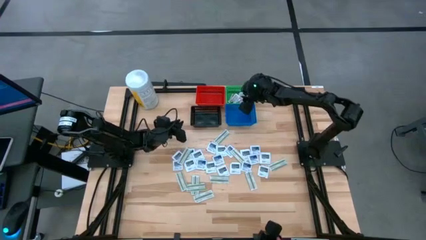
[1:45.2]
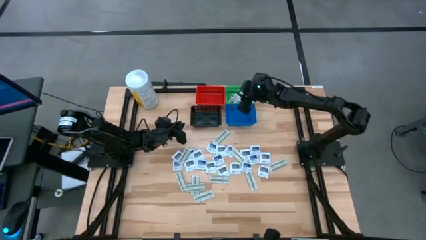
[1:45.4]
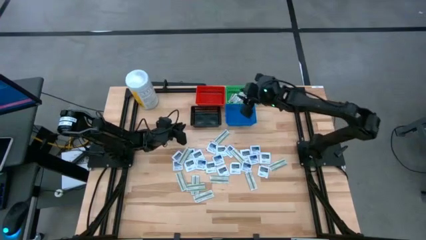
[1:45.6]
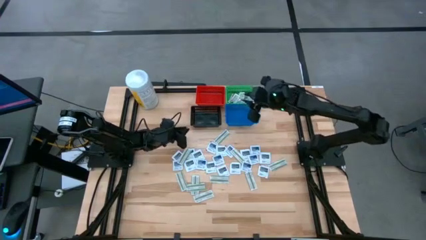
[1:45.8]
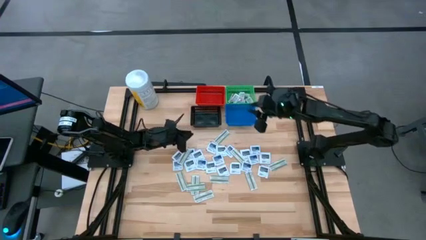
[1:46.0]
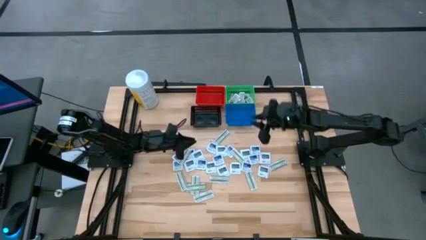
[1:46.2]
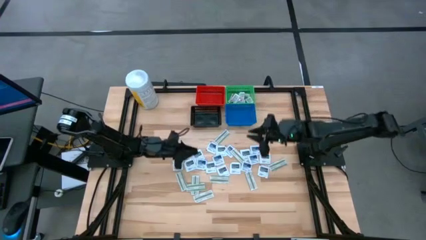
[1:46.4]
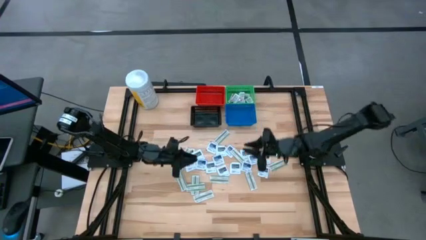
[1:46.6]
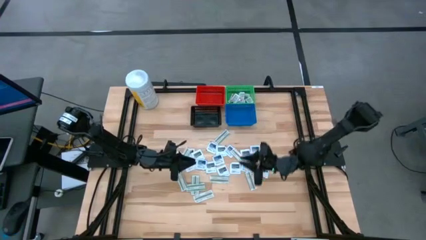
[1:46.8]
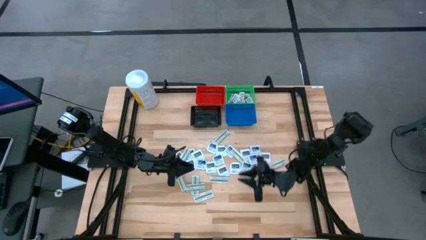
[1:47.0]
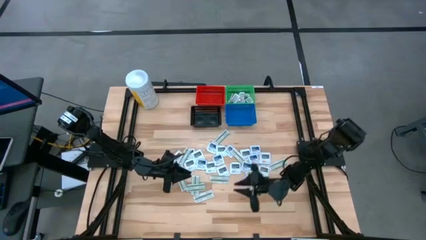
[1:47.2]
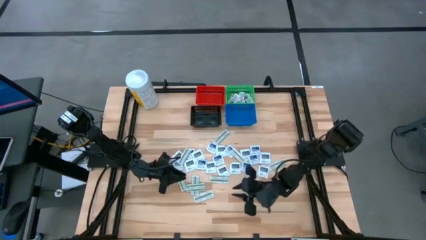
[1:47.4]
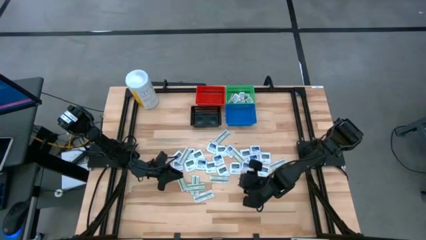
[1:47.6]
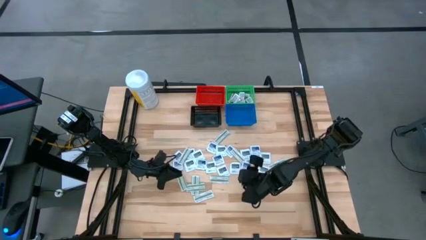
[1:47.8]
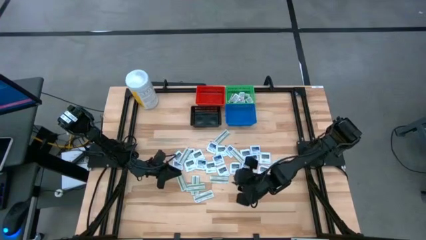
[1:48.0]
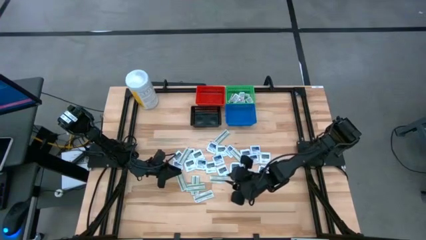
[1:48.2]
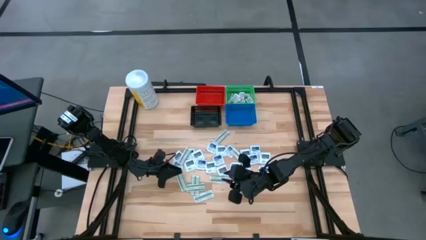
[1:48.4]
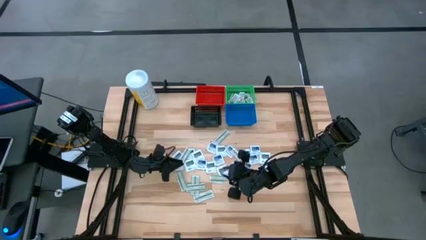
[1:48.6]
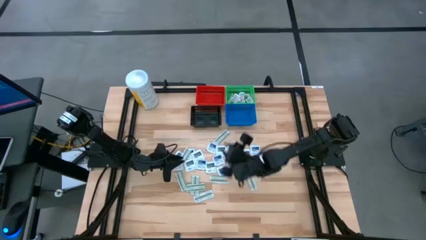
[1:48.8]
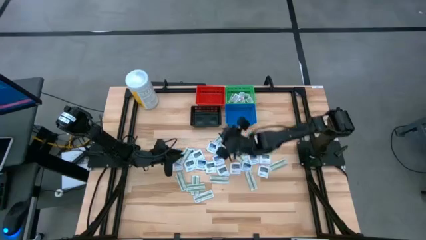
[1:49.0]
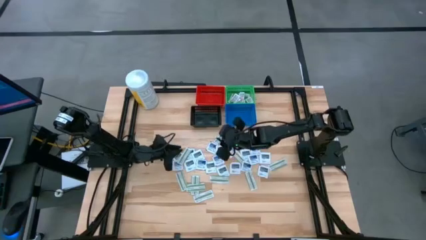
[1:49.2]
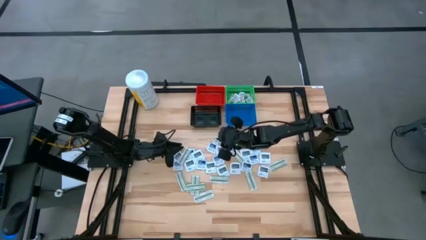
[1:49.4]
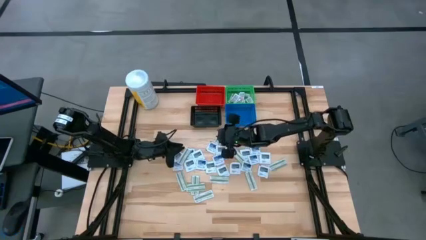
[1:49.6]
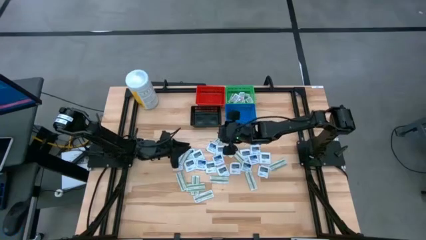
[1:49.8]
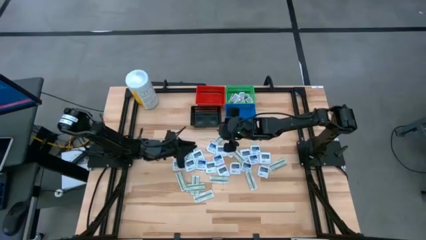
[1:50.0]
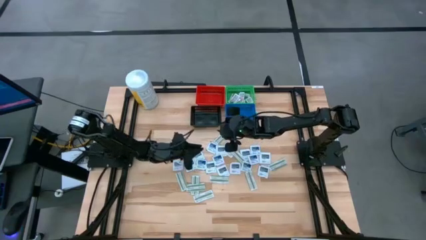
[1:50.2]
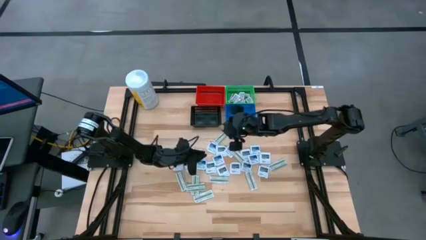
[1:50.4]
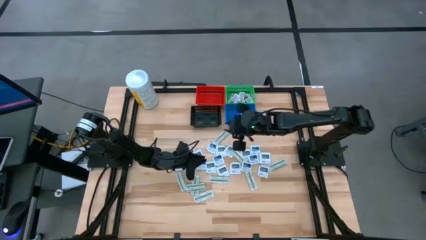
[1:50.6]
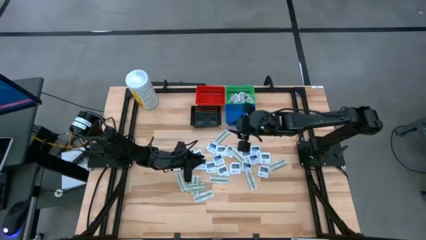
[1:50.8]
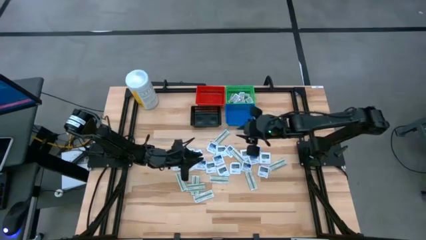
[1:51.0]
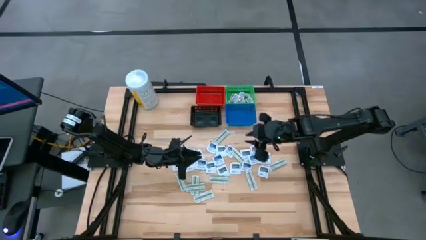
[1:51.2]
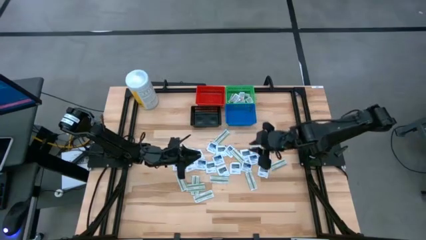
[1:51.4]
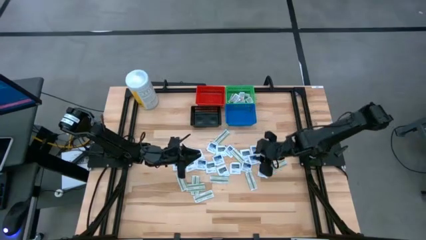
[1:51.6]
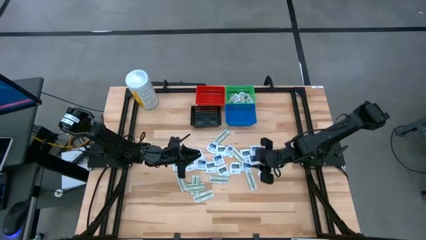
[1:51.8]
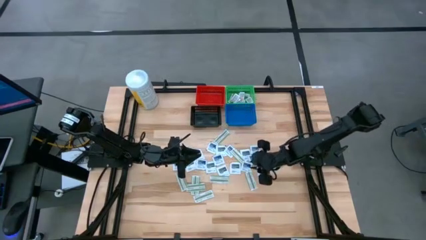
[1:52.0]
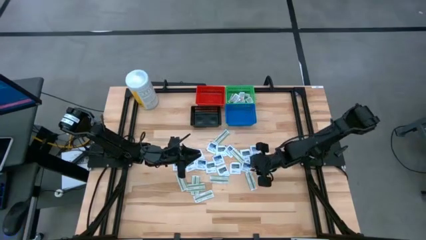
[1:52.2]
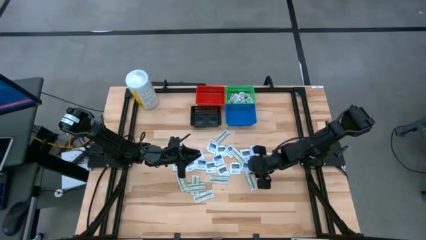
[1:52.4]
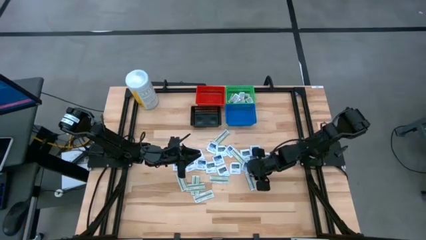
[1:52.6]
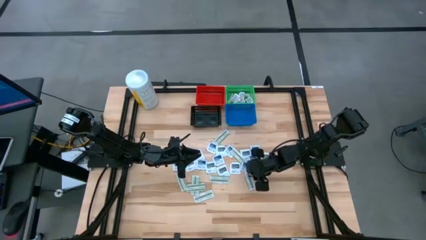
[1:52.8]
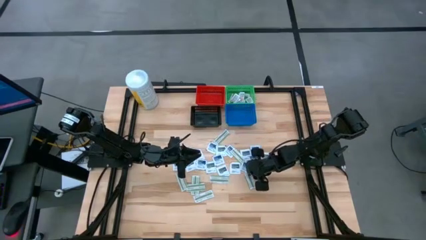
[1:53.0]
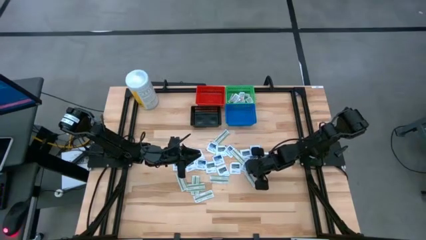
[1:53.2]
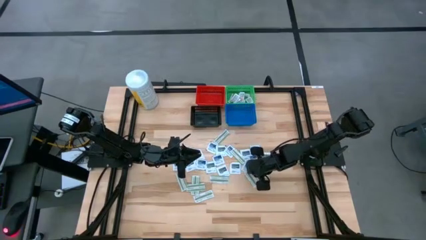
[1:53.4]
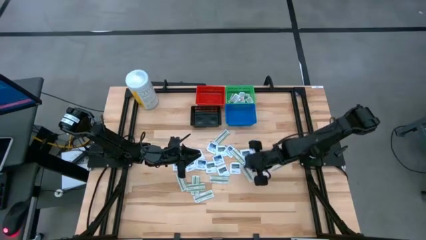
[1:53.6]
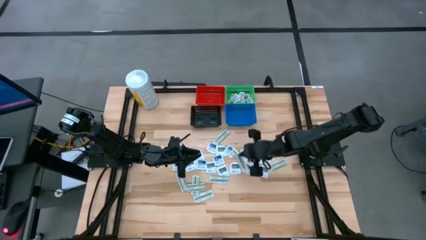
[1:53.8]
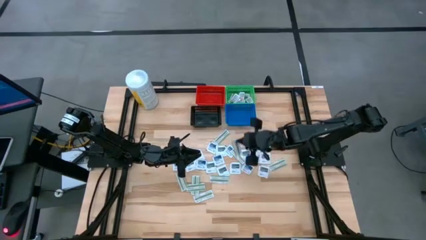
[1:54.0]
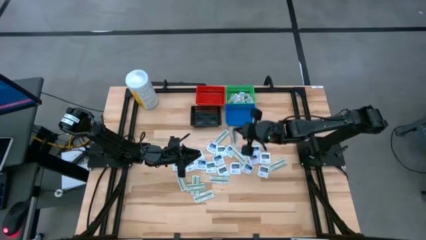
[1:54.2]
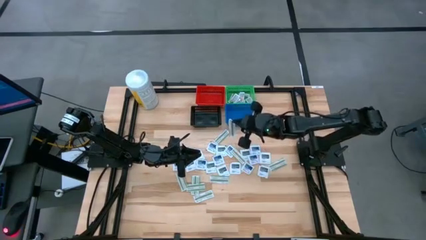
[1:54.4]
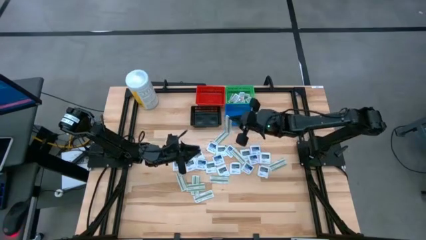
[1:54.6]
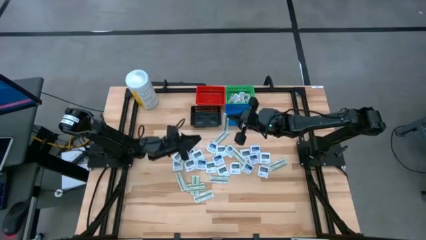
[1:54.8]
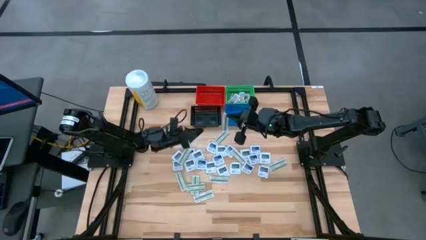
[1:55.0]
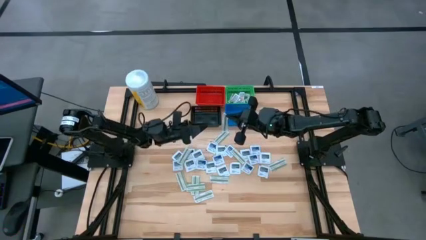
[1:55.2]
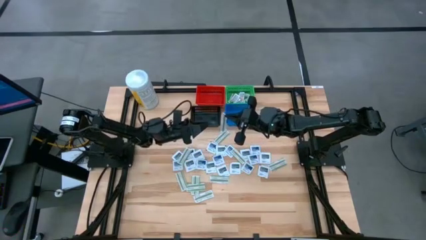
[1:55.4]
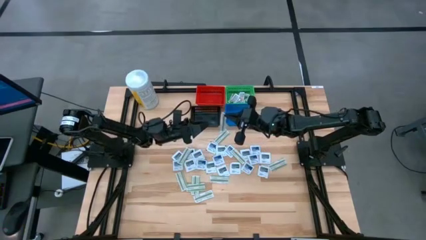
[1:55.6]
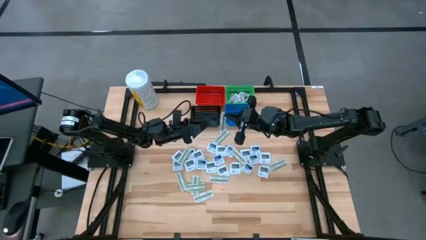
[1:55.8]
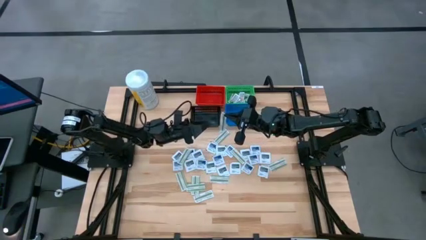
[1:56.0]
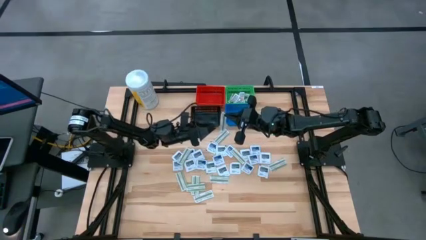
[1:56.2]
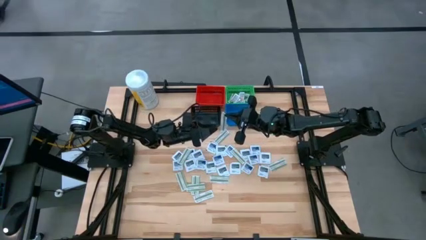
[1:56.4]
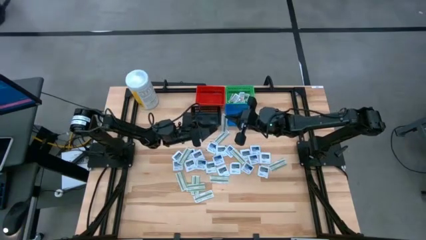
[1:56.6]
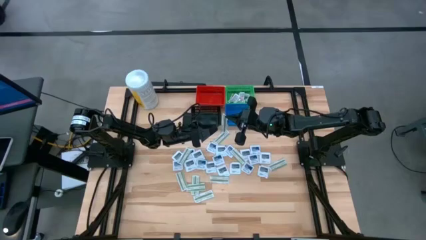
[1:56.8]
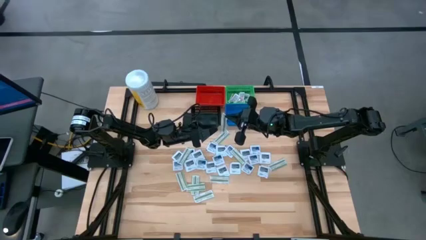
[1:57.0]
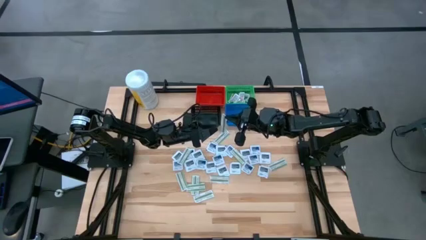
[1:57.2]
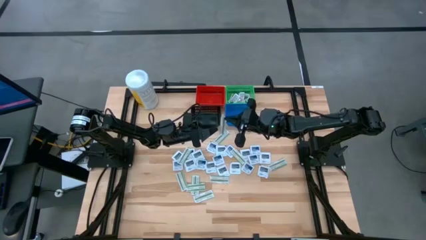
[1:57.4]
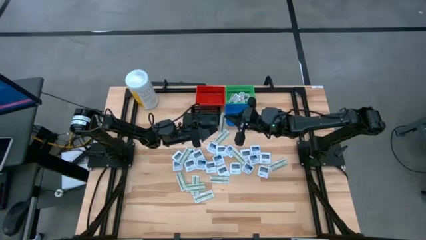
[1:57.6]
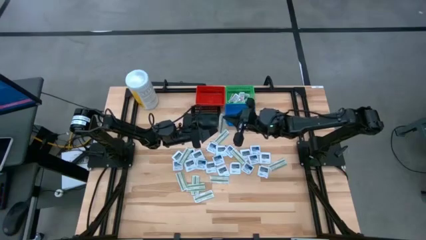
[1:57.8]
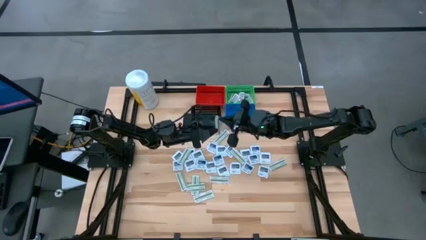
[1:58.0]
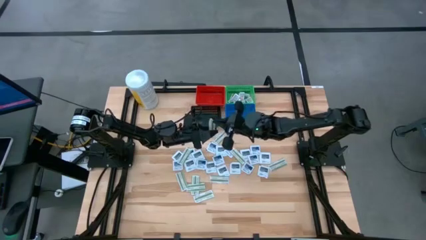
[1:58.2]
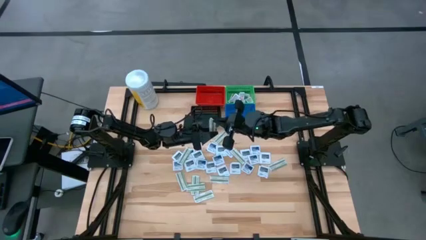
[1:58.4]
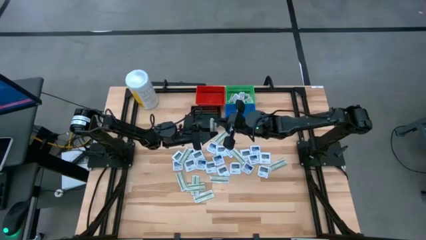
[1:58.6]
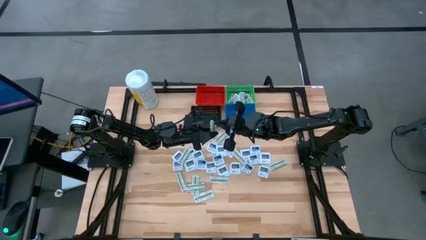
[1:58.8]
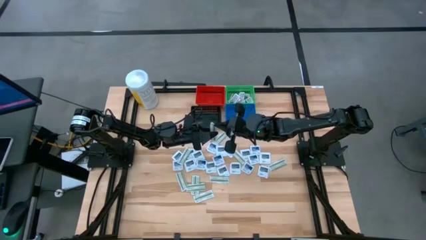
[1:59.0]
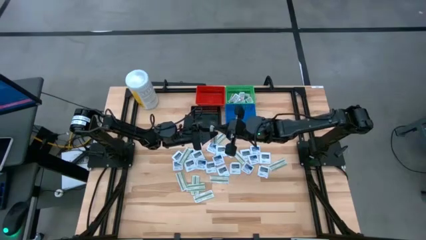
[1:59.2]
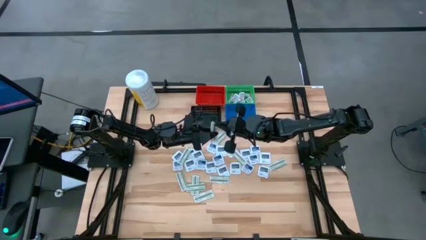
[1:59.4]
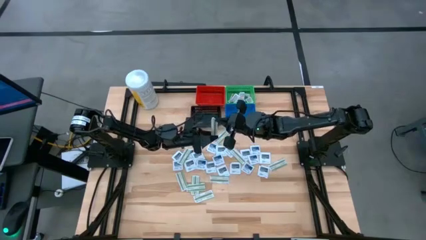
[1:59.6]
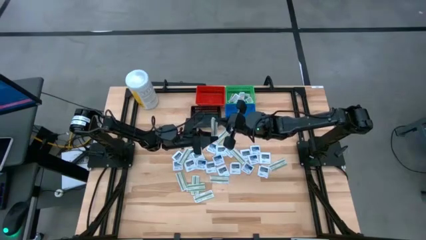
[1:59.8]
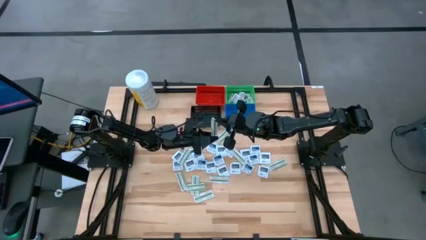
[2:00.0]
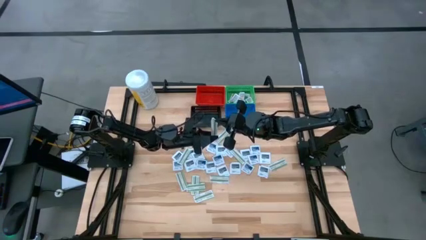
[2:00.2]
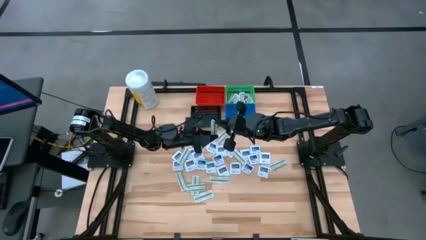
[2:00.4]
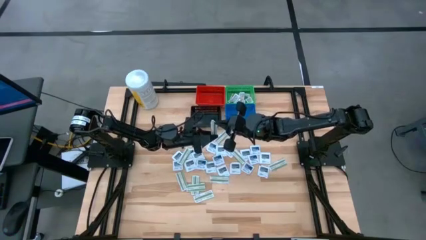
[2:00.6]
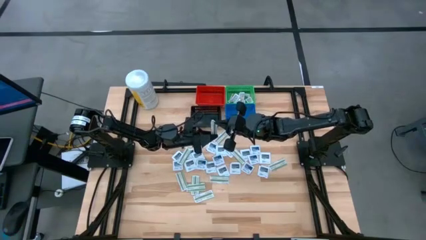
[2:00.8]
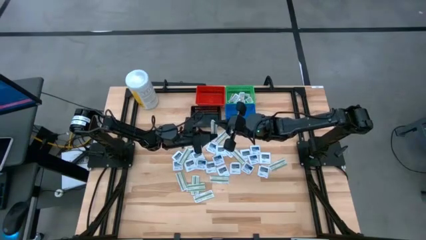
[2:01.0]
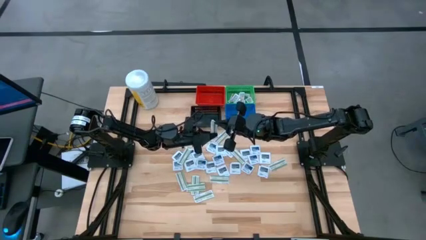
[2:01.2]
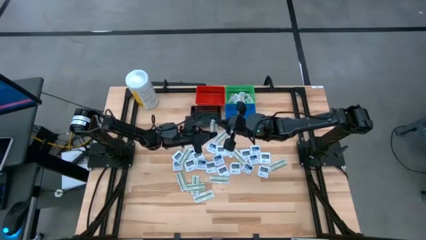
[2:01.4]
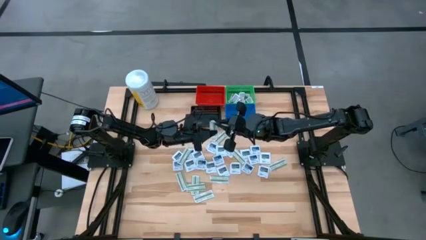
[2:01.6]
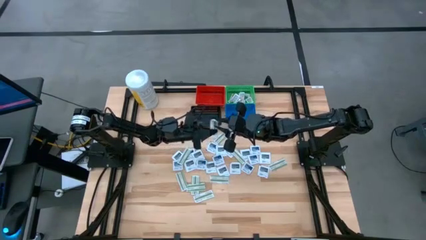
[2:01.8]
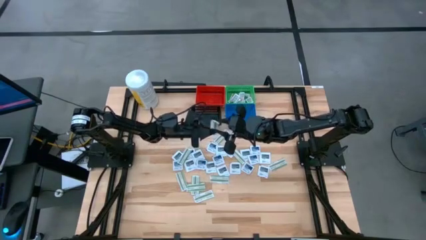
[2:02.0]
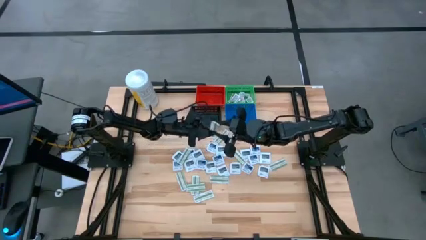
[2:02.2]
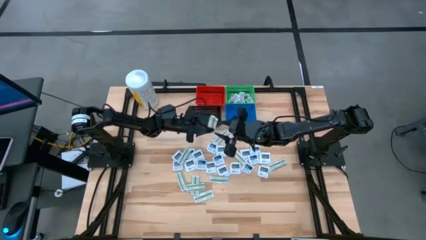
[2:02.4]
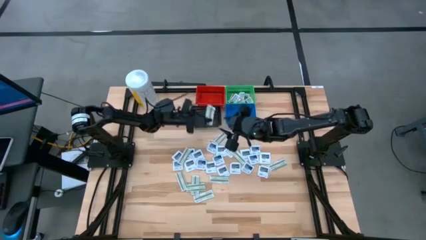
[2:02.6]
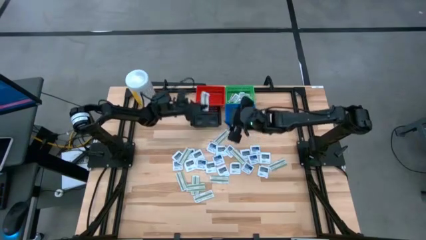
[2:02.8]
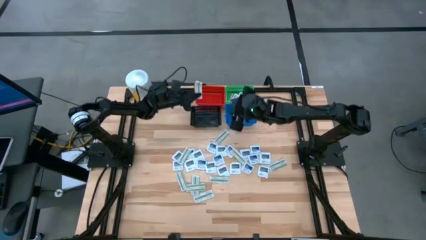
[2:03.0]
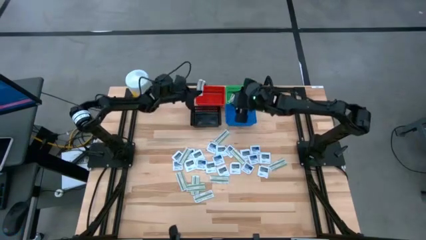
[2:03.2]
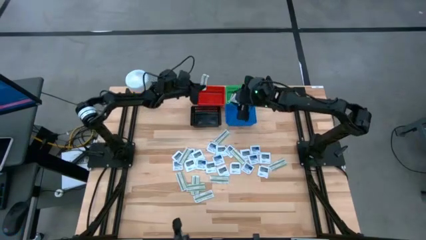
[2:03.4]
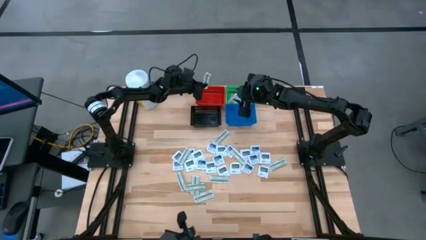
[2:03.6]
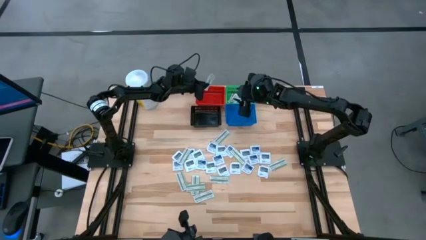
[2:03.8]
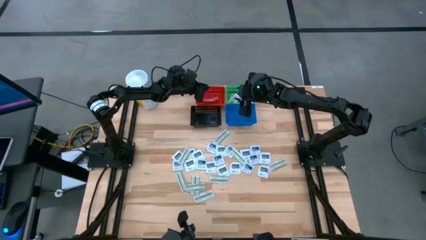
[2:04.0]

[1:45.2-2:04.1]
Task: Pick & Place First Aid Supplies
Put the bandage into the red basket
